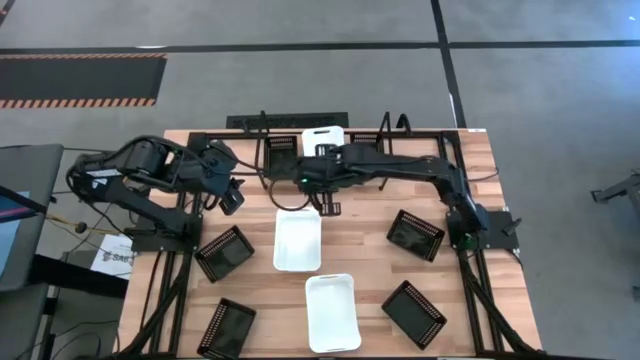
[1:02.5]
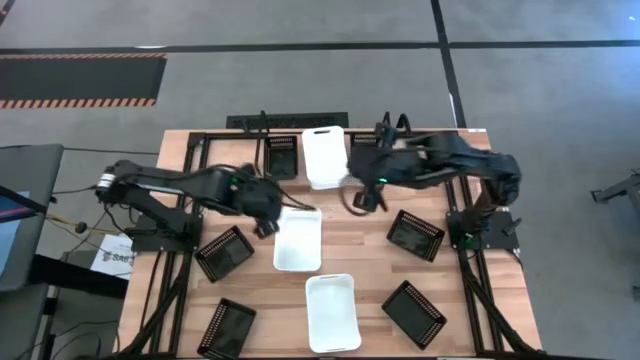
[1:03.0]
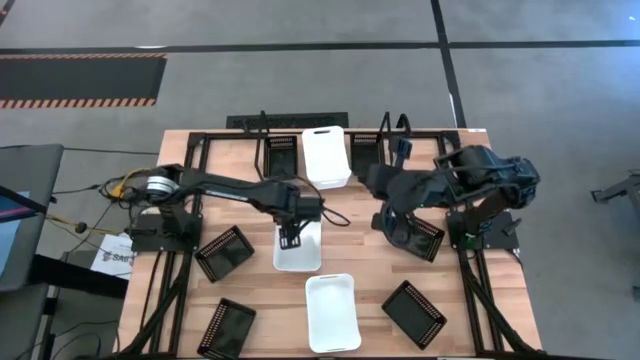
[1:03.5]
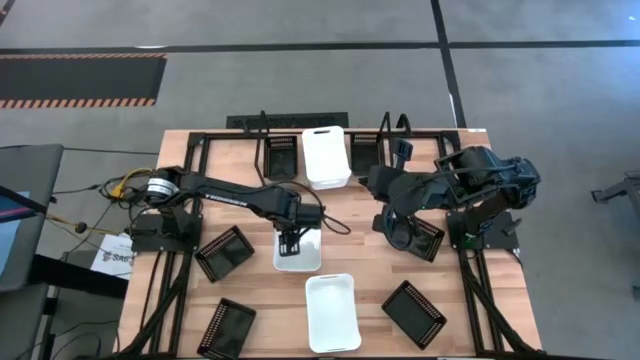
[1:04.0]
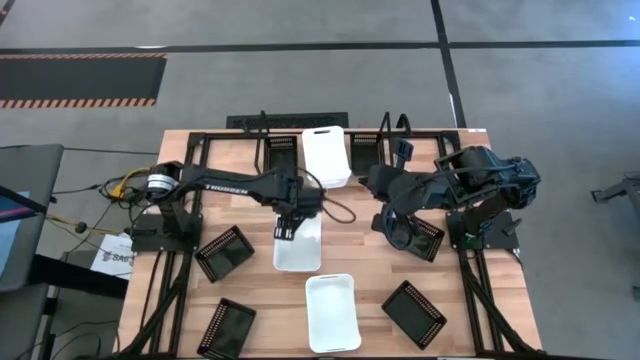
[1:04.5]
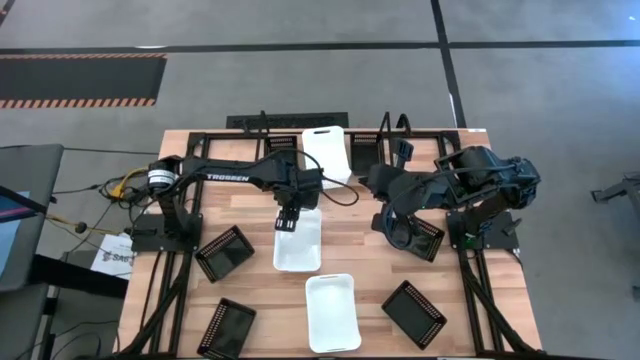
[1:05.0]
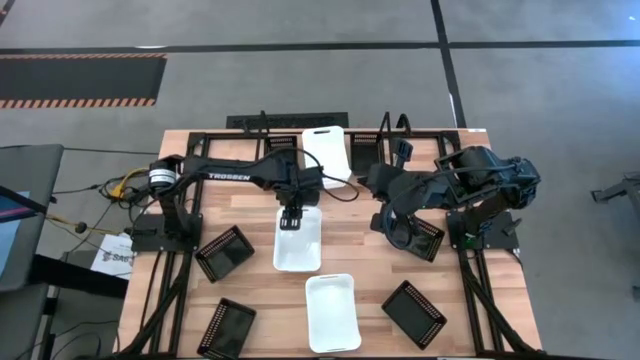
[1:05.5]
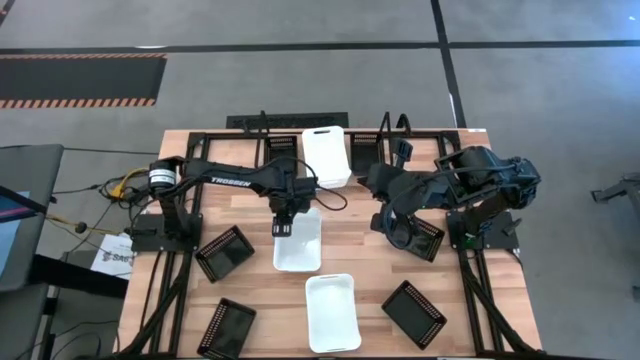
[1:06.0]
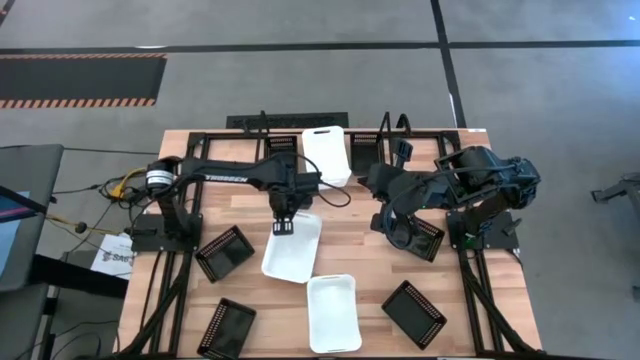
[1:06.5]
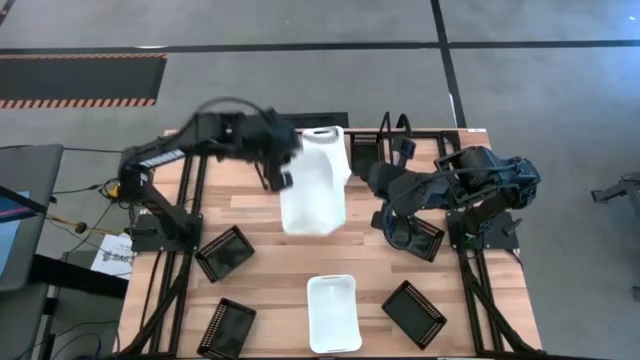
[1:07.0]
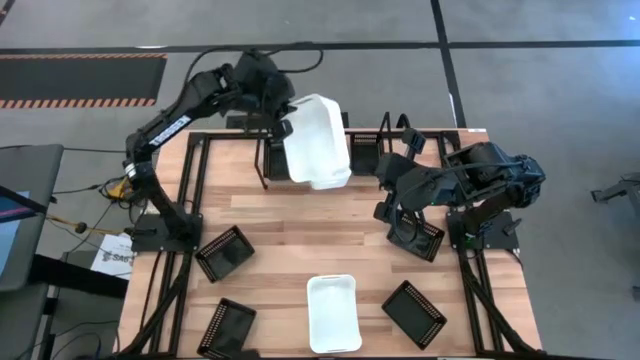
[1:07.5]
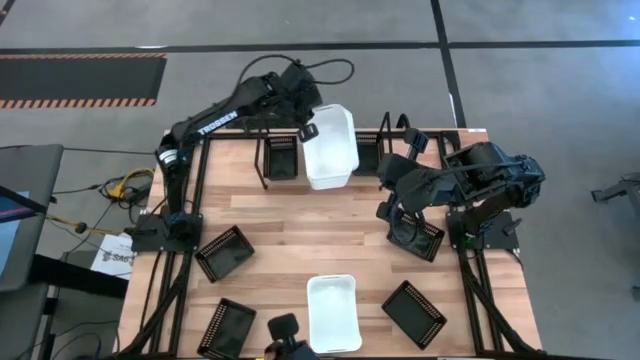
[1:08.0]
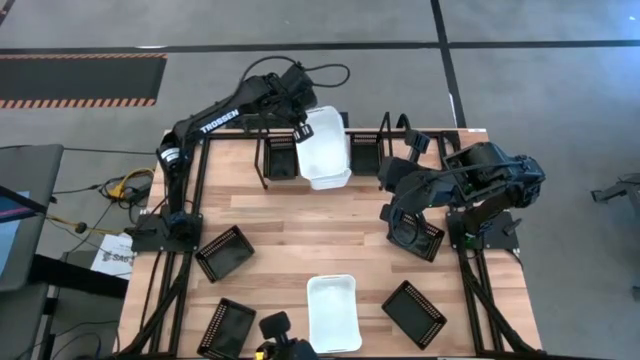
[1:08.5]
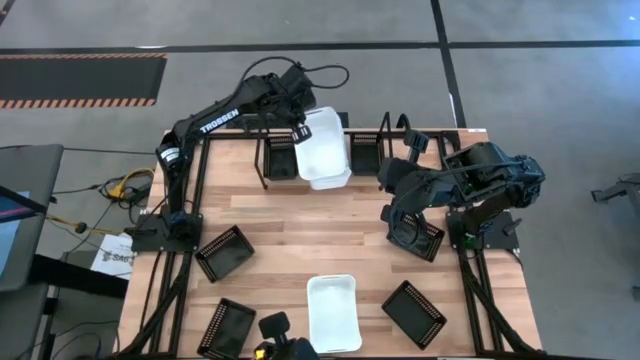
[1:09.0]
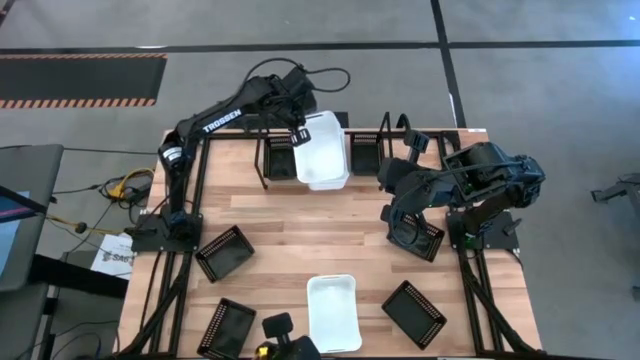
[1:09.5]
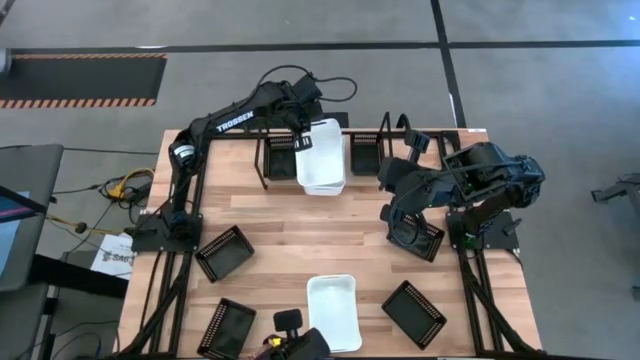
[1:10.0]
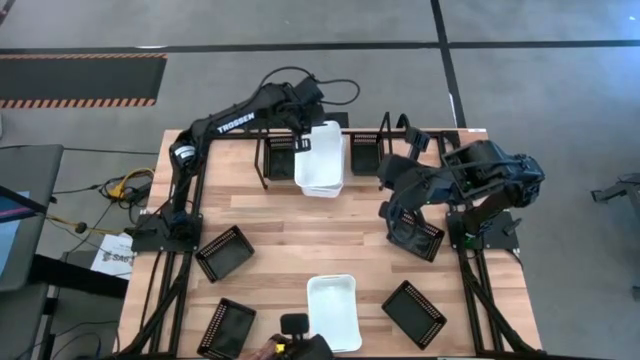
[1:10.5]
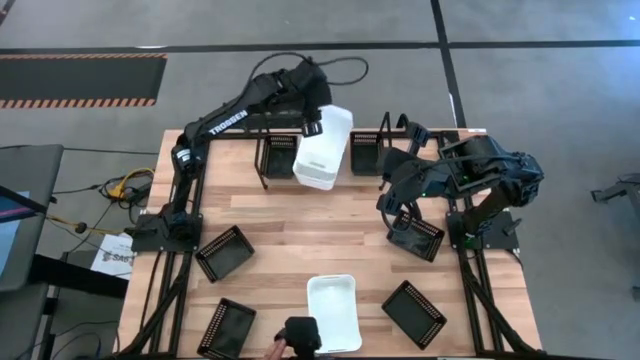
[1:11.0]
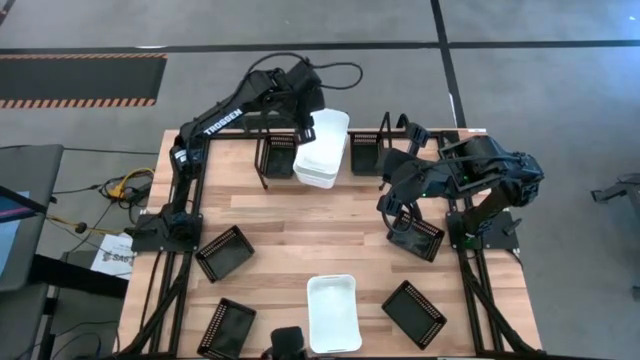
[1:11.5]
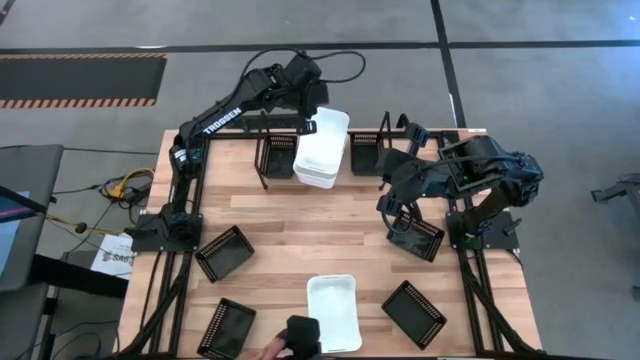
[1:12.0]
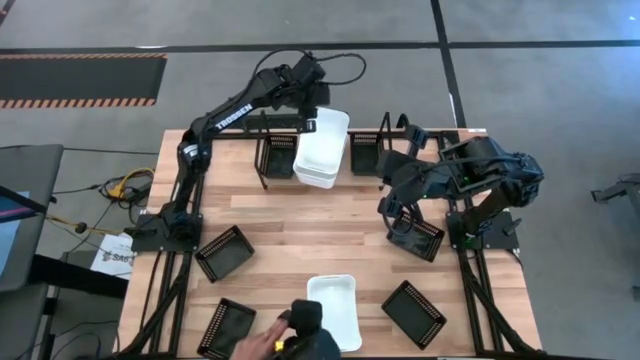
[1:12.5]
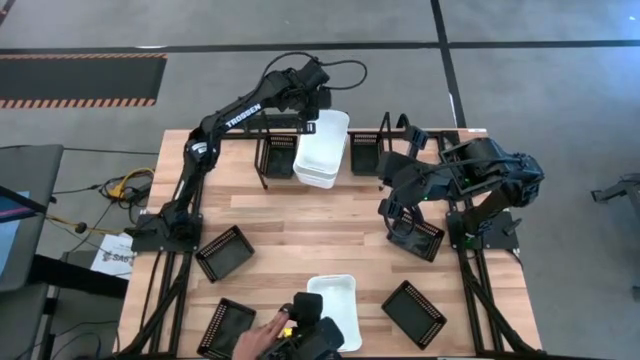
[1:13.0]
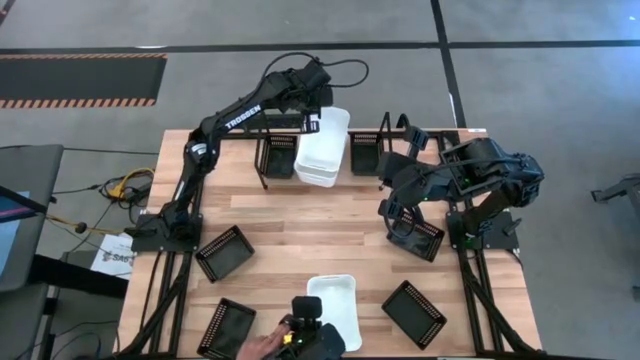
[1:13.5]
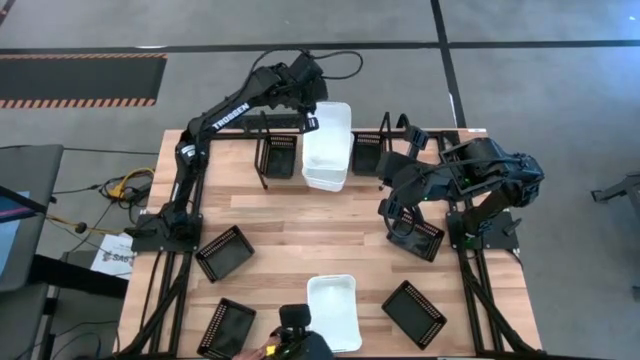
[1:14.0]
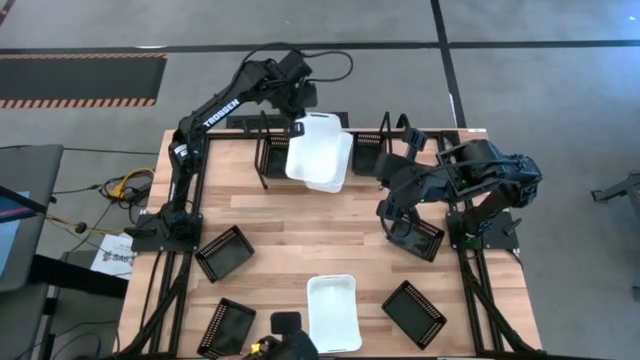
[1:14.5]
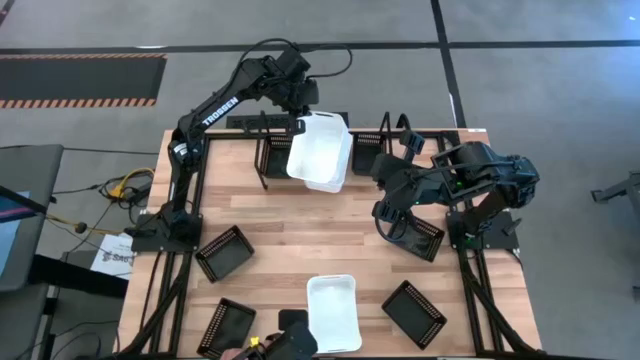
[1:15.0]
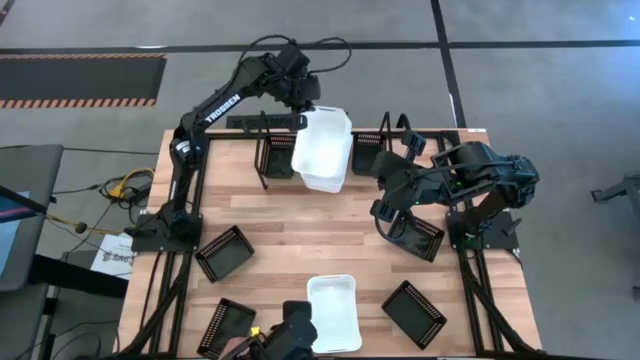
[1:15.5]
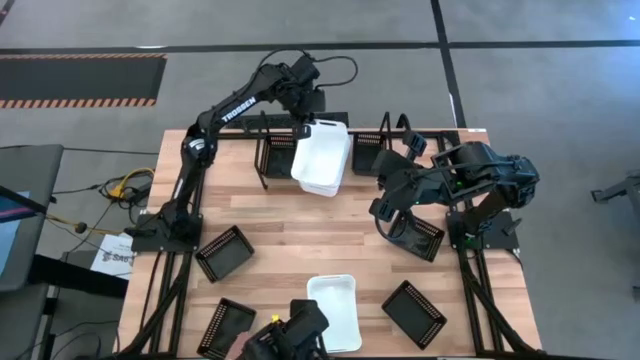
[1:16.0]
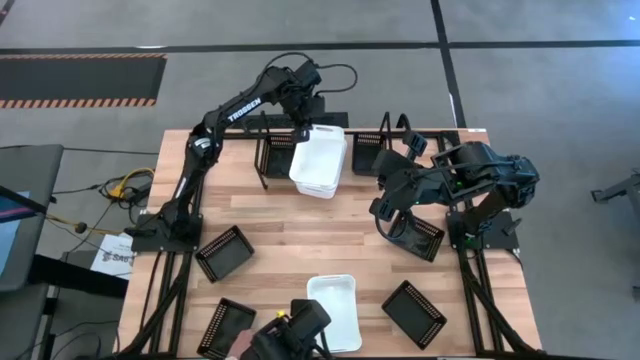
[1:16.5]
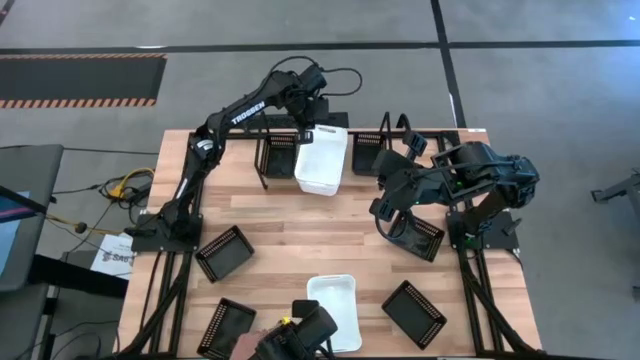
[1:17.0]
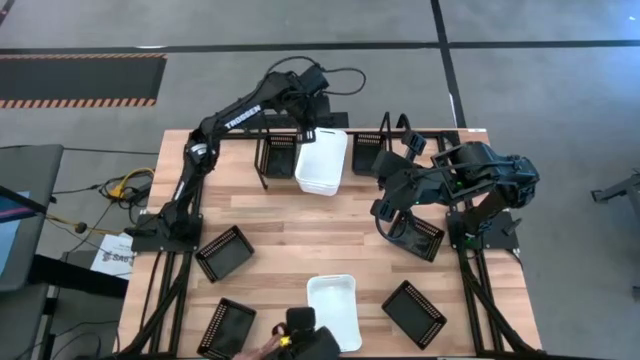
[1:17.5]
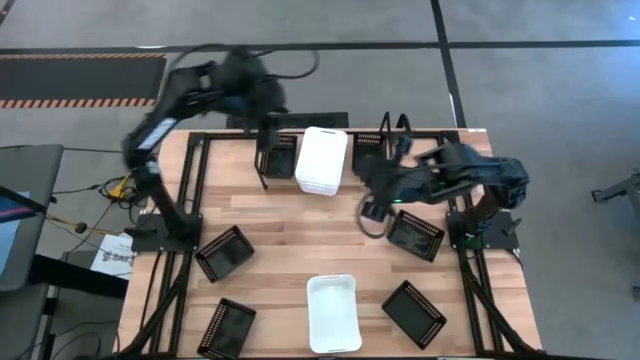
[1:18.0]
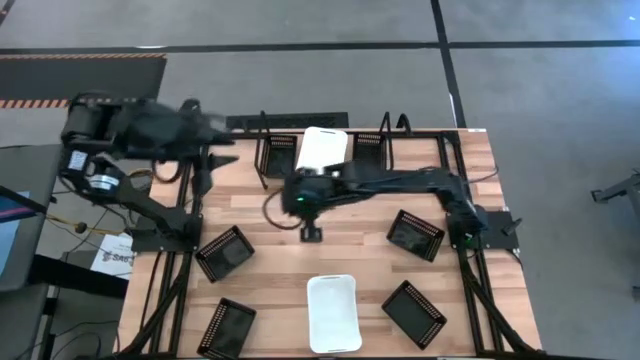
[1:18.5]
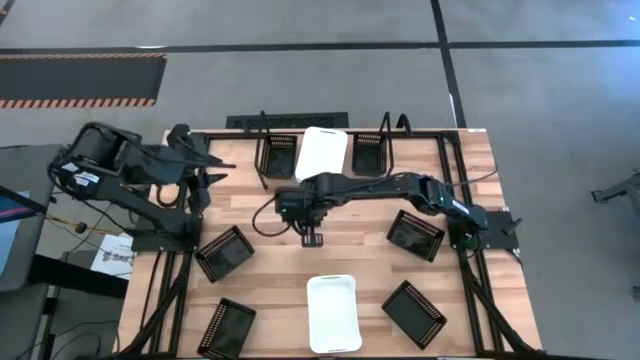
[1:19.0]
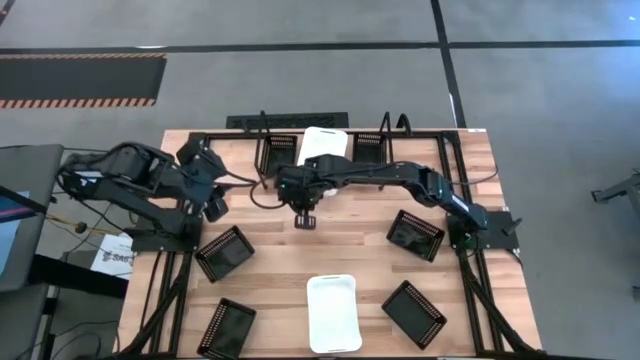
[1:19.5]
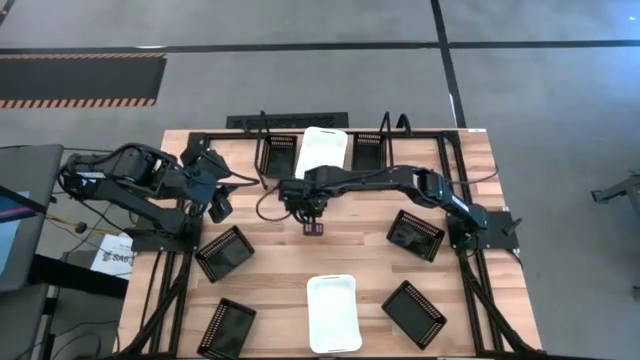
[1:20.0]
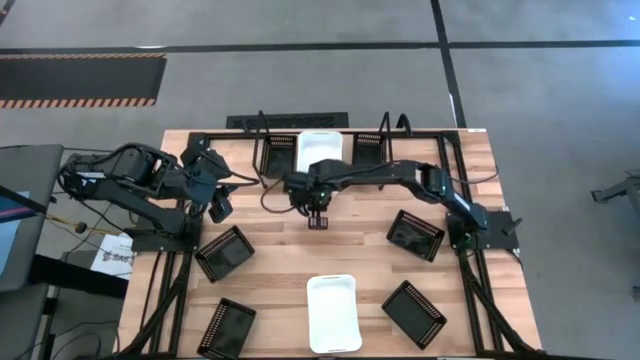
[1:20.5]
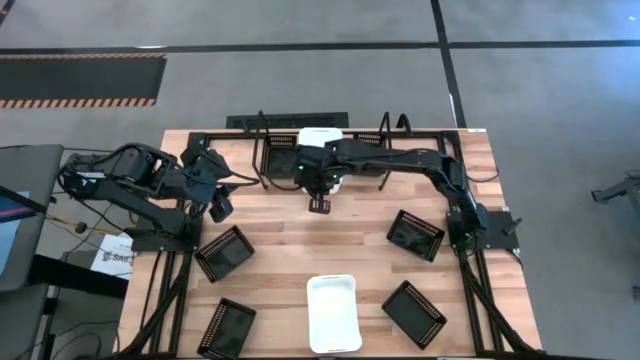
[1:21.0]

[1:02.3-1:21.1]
Task: Stack baskets on shelf by color
Stack the top white bin on top of the white bin on the shelf

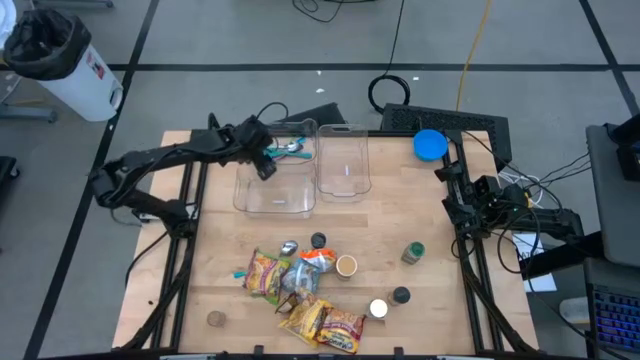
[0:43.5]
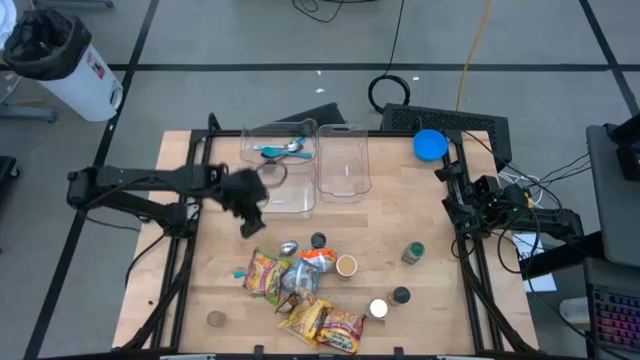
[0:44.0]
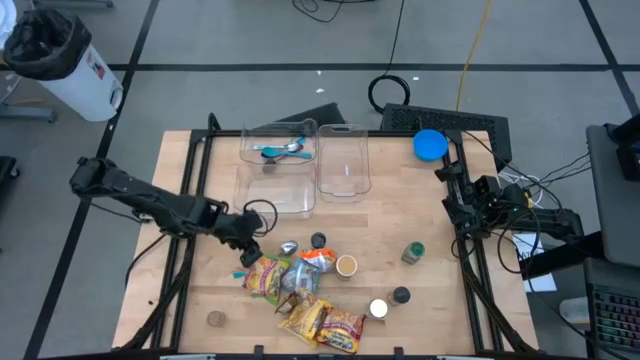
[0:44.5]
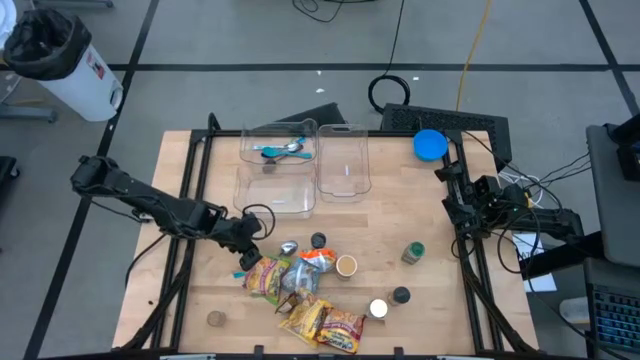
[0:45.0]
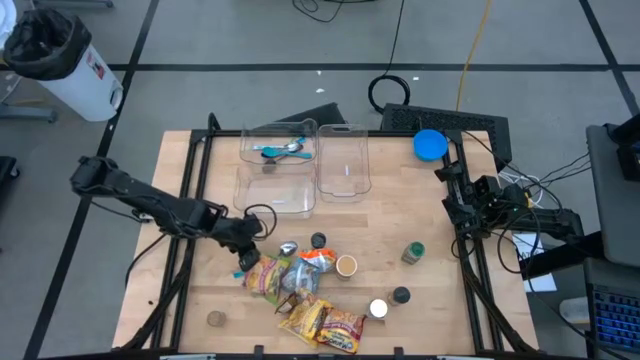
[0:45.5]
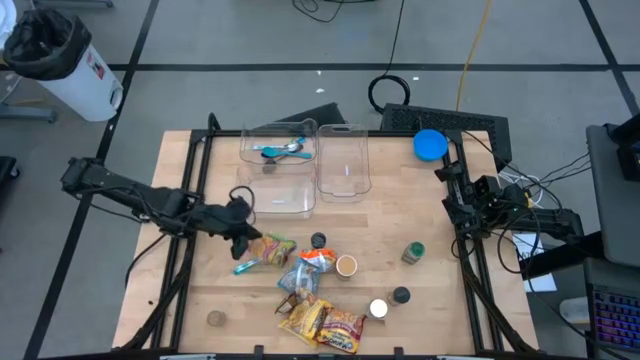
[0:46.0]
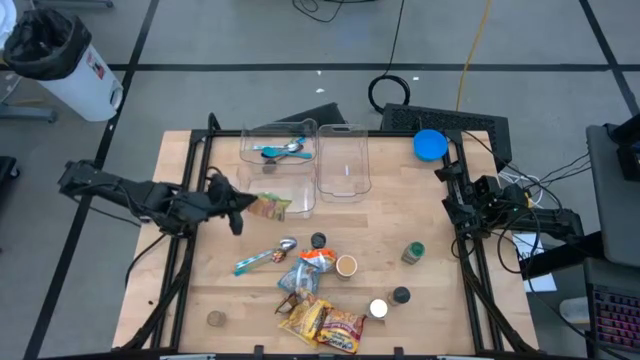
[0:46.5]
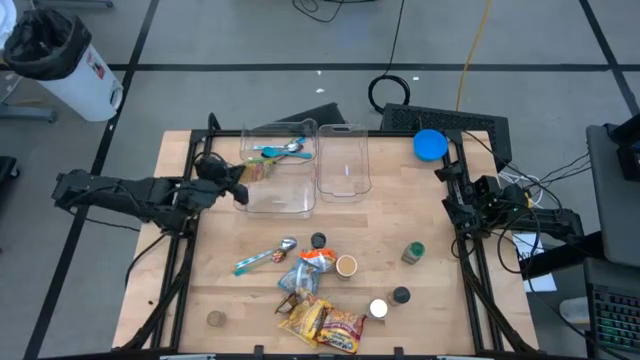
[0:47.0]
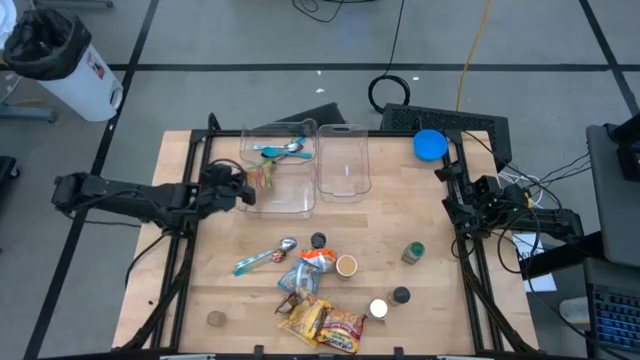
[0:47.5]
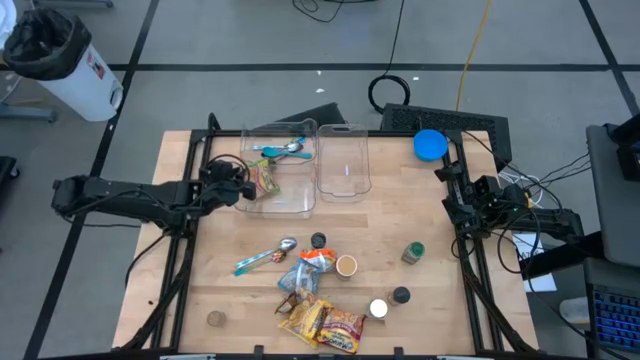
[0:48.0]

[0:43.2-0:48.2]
Task: Pick & Place Food Item
Put the green noodle pack into the bottom left transparent bin
